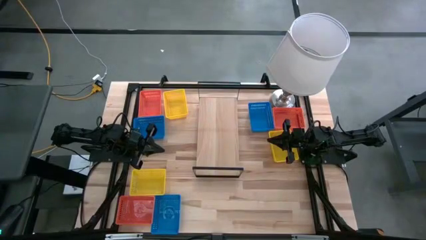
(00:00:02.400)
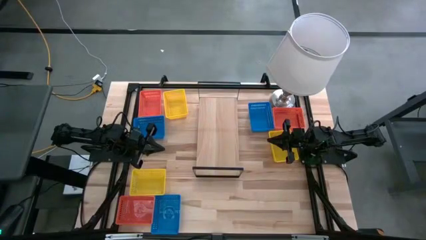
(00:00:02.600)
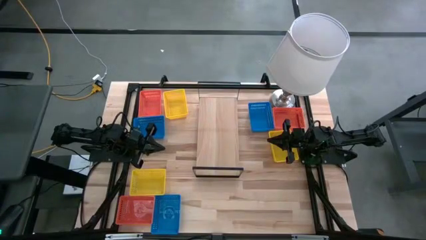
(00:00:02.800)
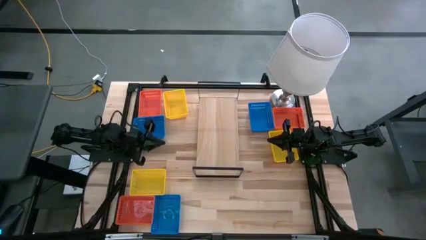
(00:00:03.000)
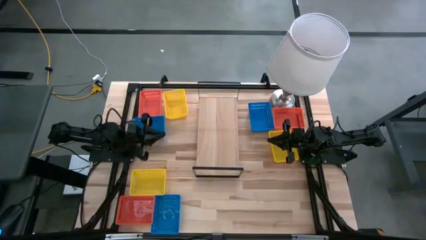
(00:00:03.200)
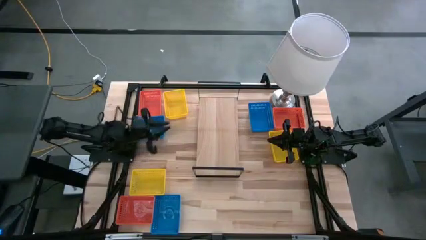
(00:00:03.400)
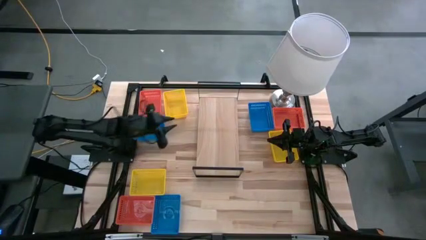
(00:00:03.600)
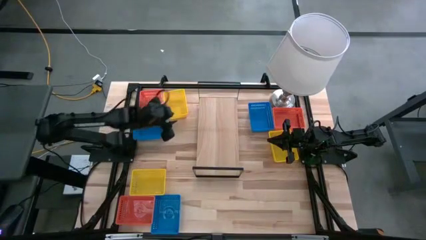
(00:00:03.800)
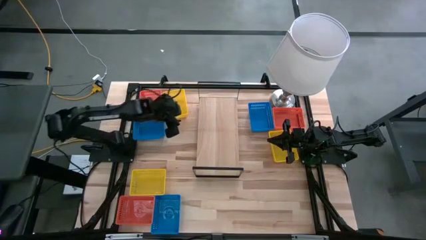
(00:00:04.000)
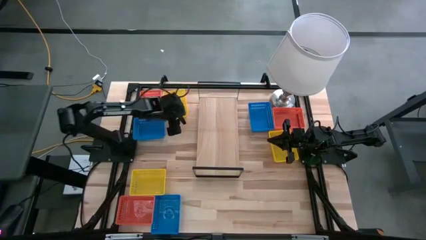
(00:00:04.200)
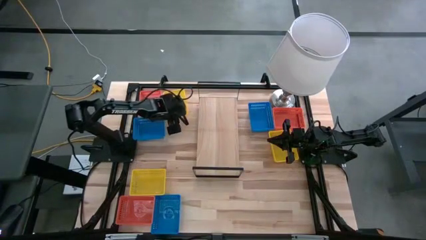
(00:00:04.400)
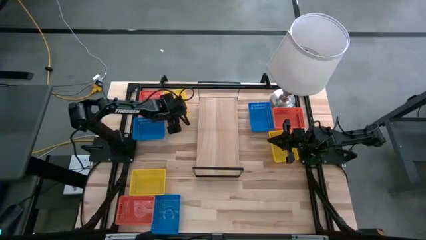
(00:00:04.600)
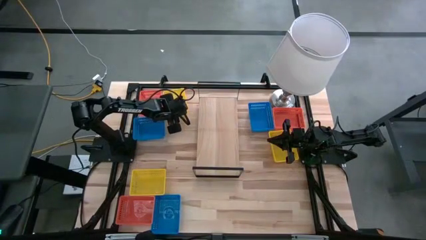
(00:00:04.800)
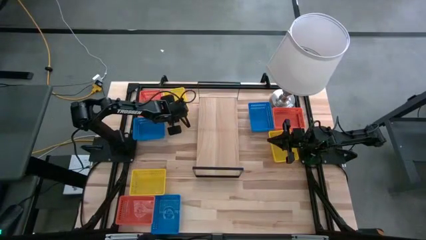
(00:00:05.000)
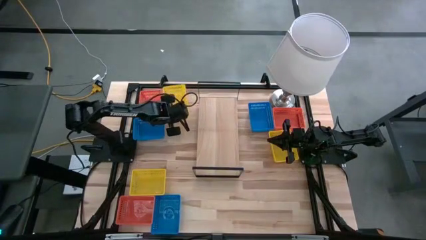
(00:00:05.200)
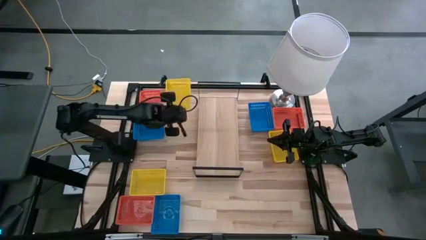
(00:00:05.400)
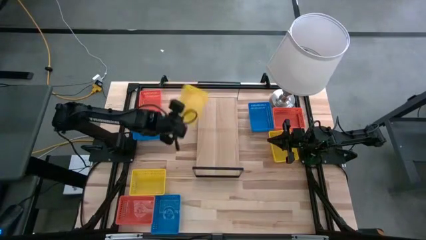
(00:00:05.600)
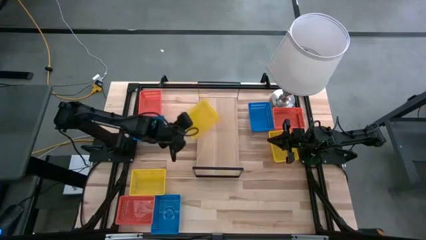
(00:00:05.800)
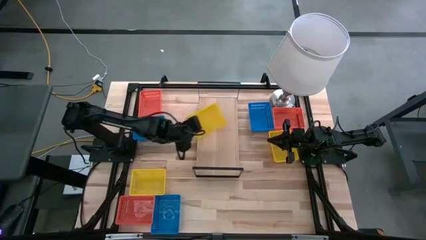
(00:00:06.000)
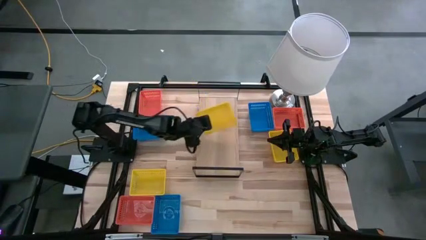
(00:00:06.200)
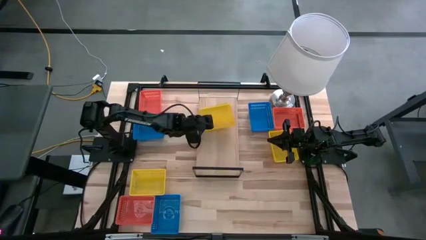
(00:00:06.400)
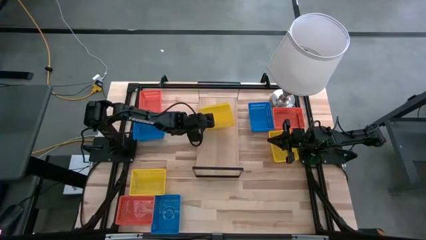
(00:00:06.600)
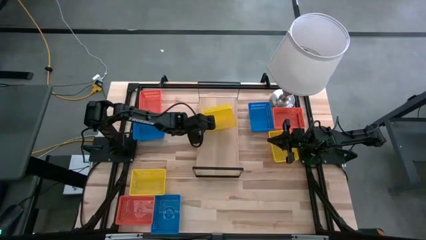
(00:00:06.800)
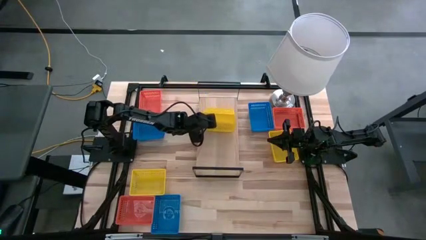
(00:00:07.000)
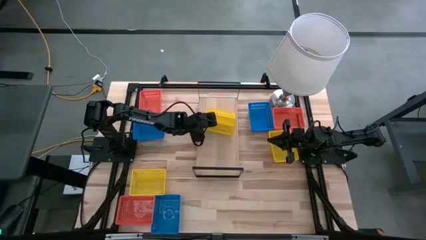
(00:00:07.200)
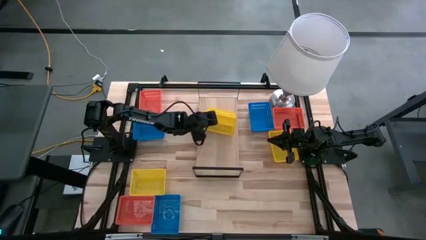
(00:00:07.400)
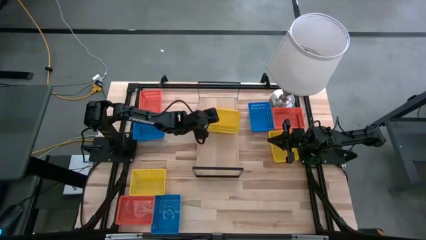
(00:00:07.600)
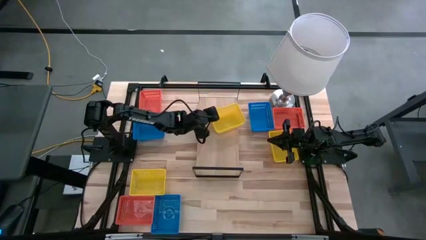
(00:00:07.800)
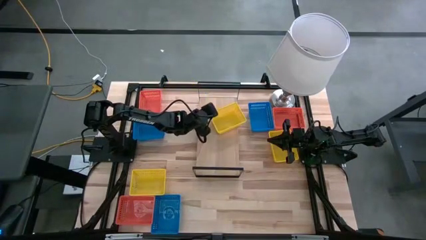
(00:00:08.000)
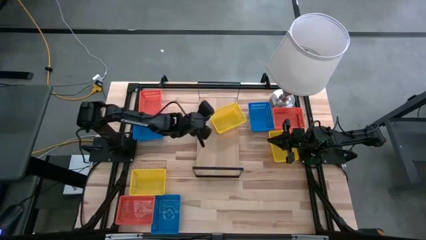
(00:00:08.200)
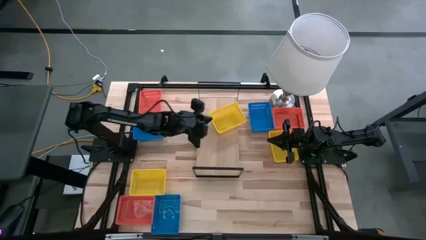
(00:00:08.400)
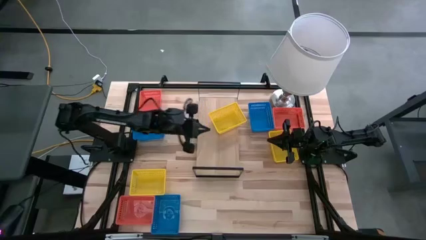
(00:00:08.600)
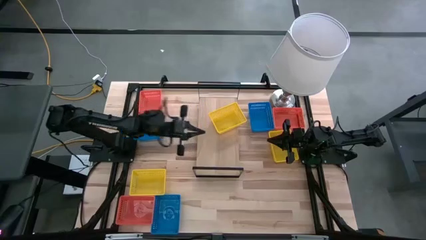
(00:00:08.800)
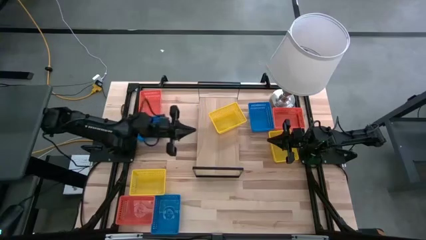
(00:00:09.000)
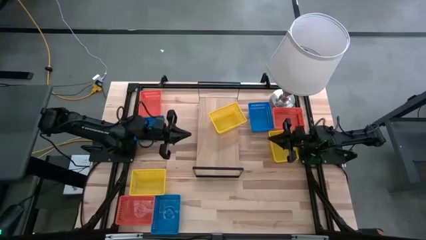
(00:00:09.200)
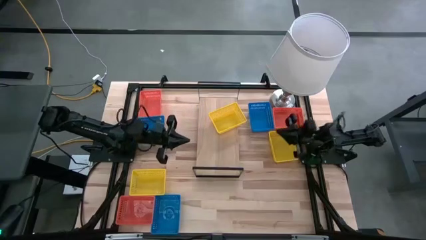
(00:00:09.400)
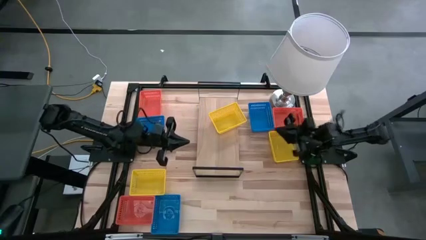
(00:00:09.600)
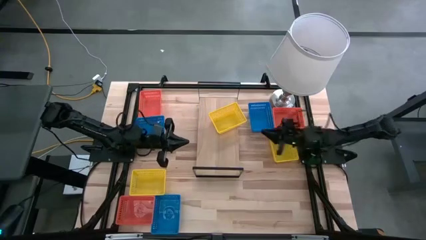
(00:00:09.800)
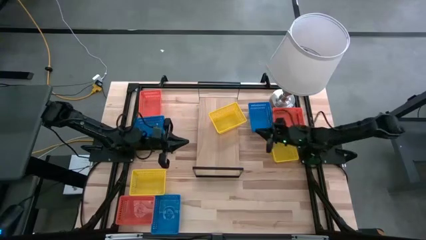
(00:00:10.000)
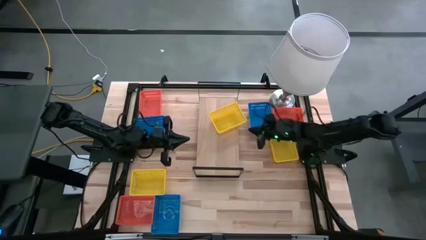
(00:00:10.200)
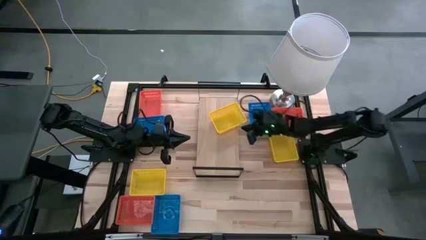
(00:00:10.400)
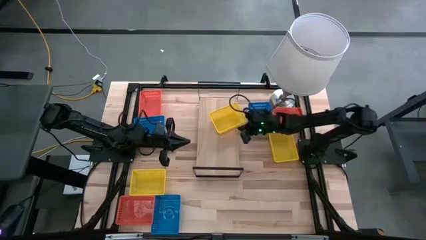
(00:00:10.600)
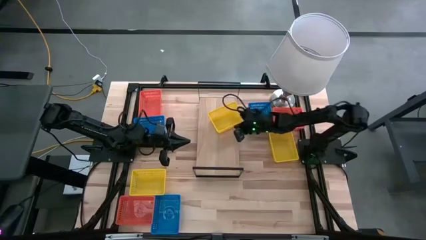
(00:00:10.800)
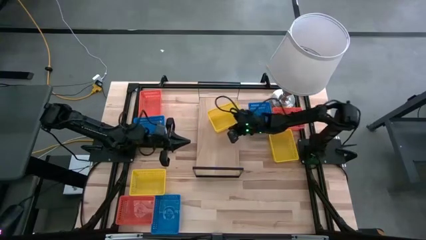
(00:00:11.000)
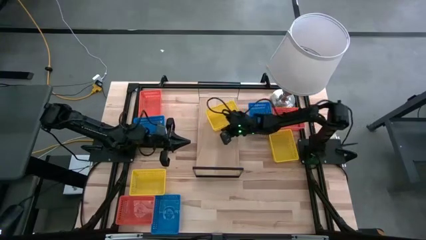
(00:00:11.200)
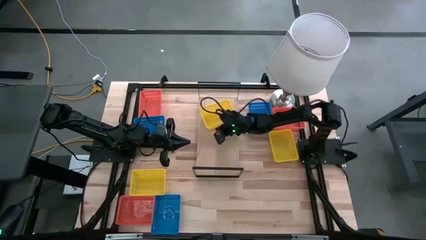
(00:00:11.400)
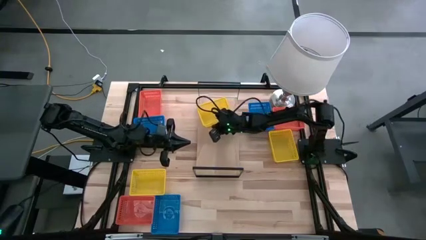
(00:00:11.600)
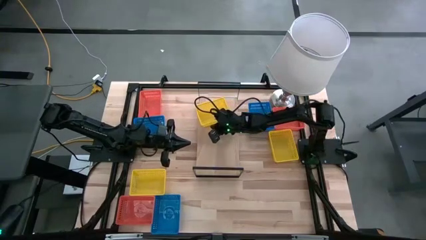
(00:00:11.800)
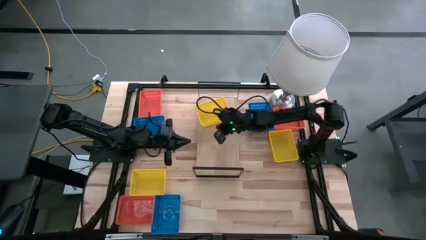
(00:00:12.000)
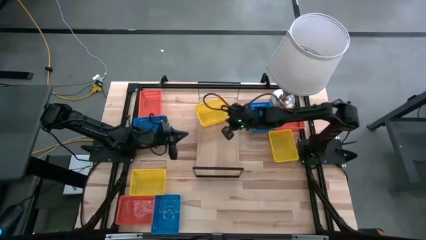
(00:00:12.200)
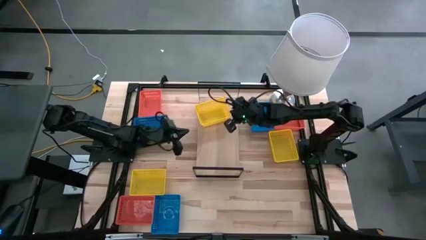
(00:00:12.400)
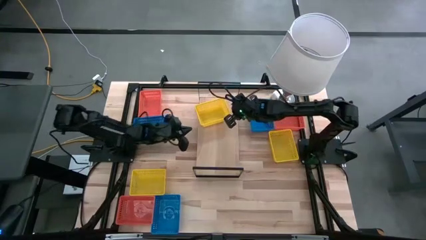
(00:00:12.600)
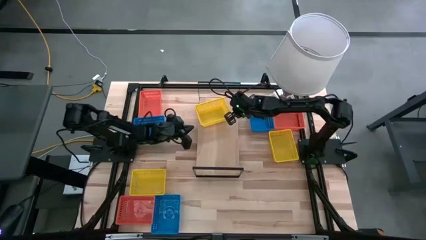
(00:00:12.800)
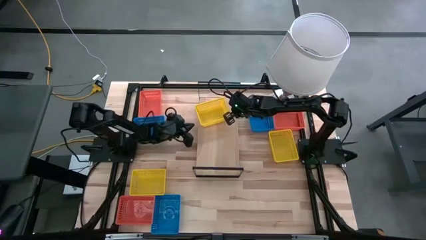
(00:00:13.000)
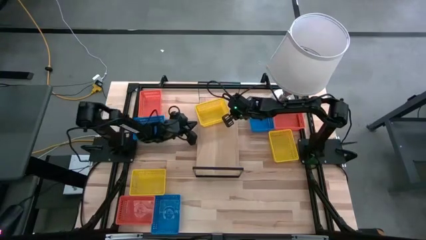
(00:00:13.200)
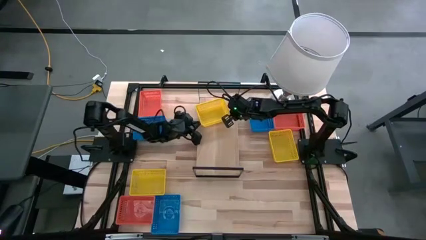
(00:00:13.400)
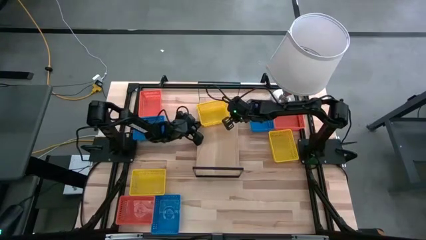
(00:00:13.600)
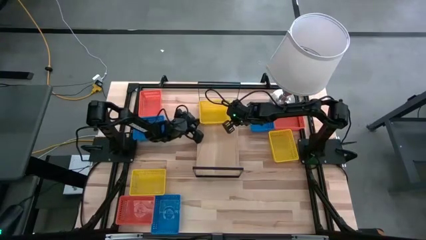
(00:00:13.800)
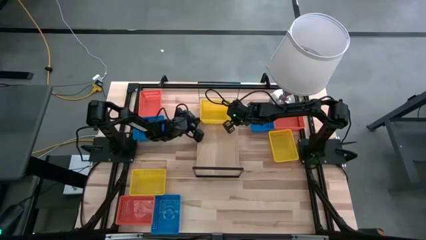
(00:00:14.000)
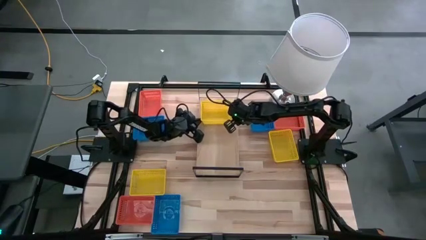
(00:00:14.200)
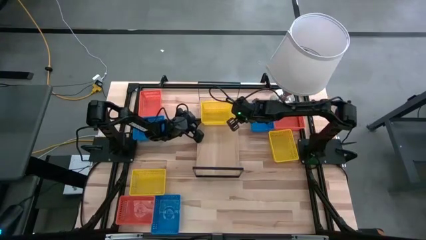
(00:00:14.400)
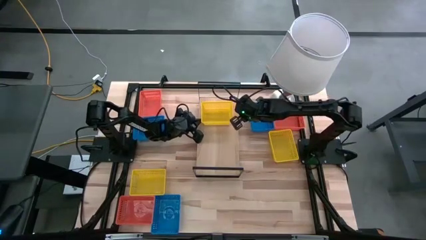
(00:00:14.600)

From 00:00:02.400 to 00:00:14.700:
Task: Stack baskets on shelf by color
Put the top left yellow bin on the shelf

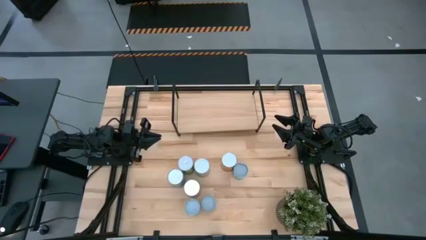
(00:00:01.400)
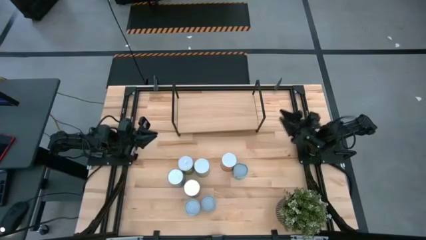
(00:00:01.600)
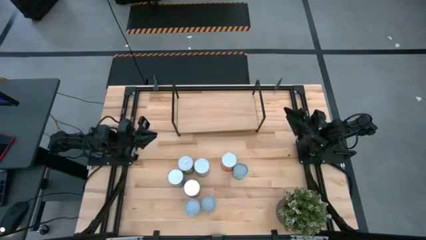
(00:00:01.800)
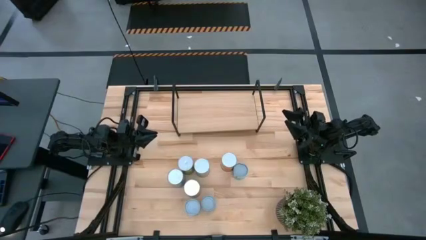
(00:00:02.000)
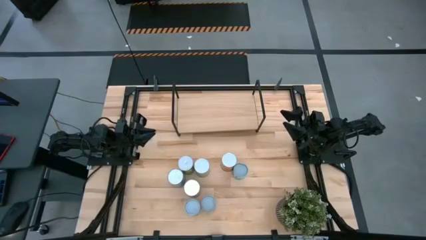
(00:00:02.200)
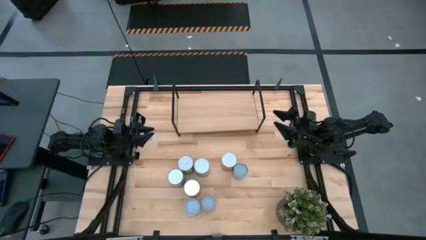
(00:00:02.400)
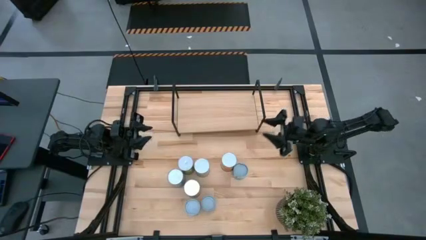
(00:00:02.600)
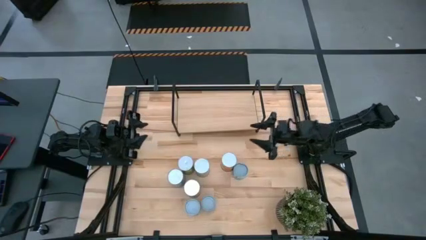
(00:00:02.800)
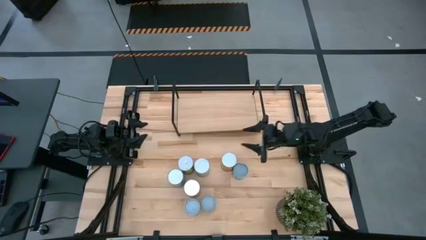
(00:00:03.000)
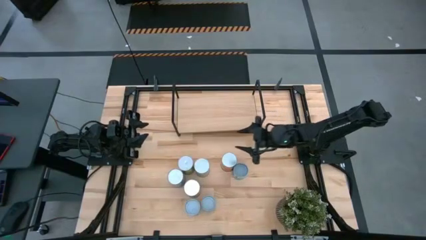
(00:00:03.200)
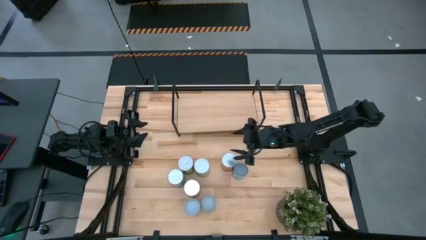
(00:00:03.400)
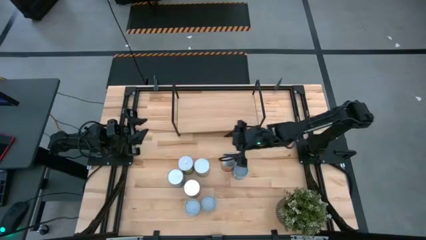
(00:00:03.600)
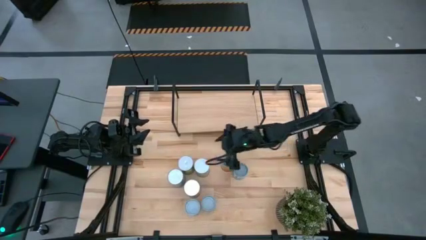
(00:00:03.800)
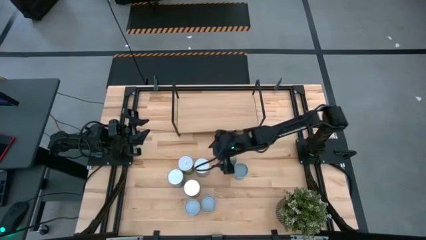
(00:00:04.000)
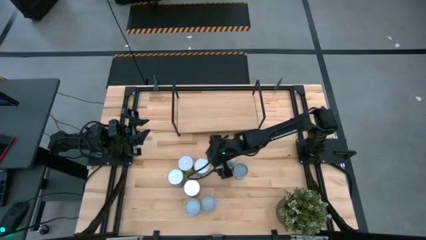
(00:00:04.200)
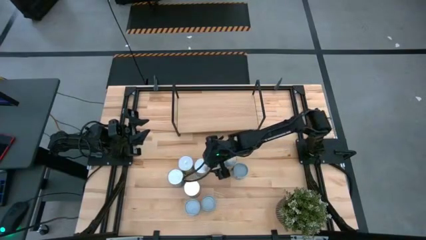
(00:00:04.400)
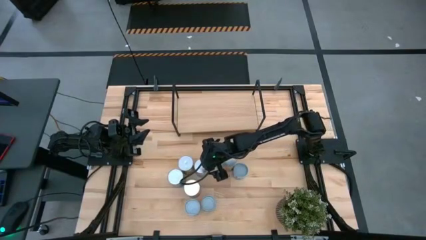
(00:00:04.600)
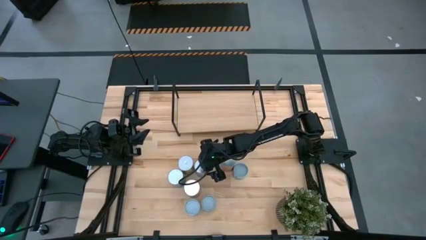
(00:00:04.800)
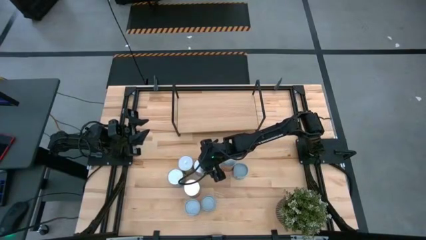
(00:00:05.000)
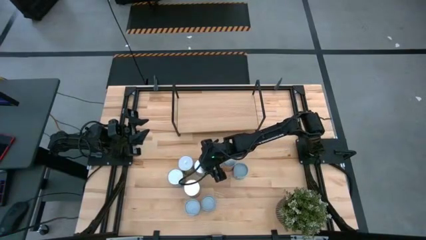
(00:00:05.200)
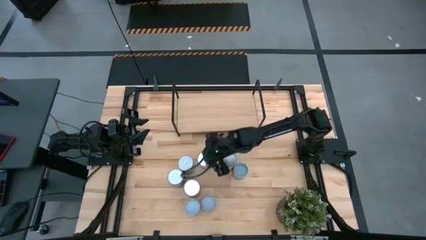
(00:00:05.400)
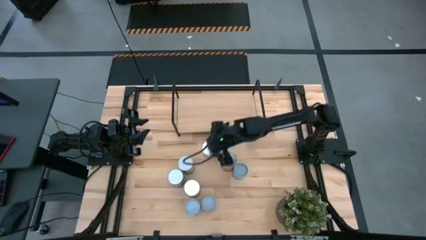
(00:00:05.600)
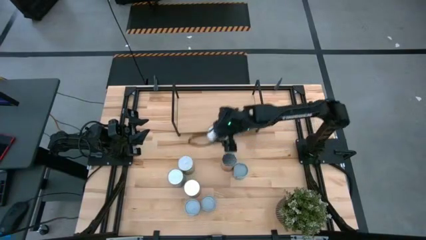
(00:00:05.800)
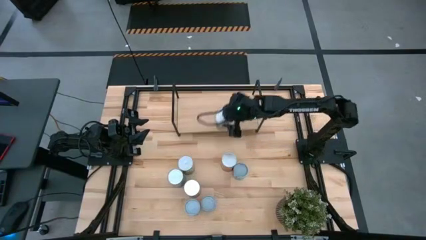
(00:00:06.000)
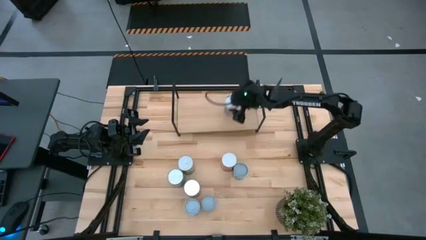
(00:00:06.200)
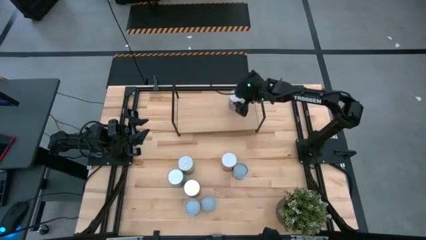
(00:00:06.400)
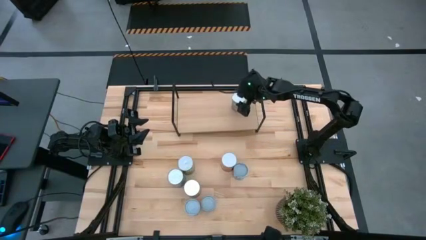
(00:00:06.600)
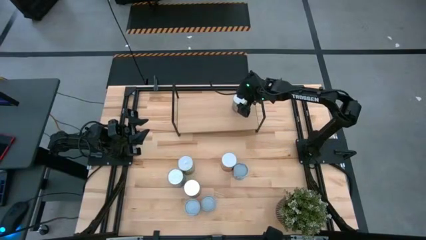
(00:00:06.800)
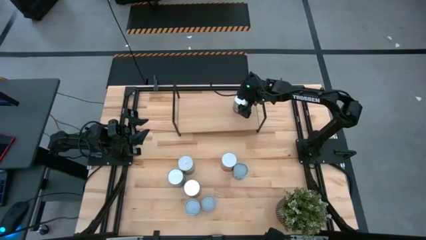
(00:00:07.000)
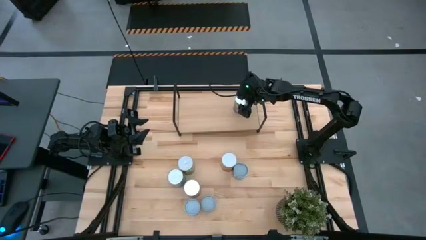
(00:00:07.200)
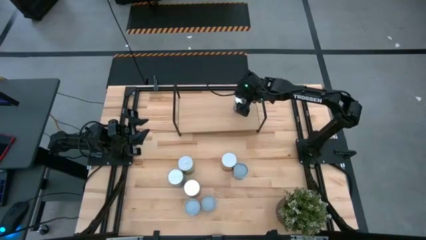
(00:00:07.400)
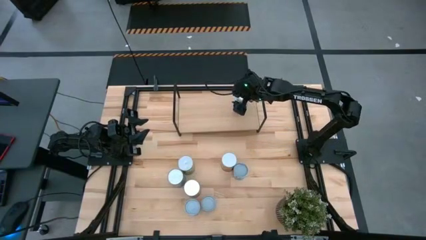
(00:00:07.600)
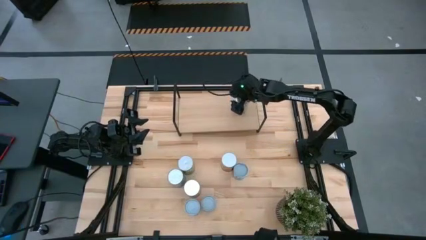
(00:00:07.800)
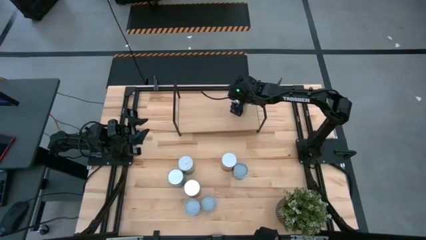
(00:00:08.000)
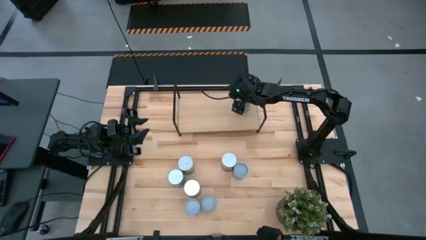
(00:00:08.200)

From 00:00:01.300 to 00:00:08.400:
Task: Pick and place cans onto a shelf
Put the canned peaches on the shelf
